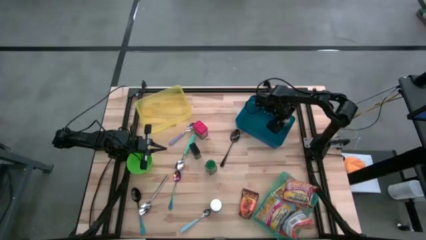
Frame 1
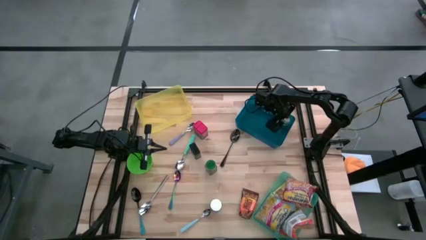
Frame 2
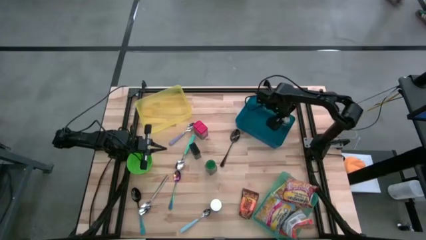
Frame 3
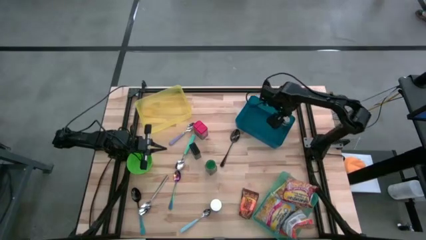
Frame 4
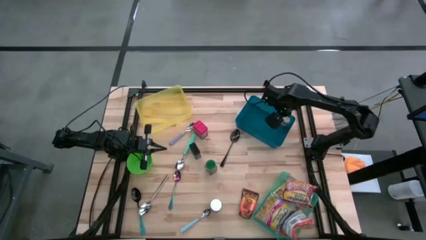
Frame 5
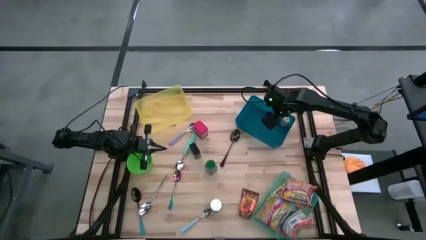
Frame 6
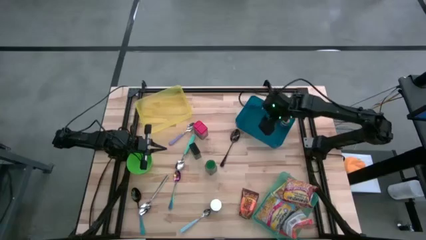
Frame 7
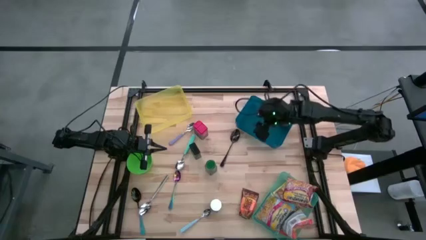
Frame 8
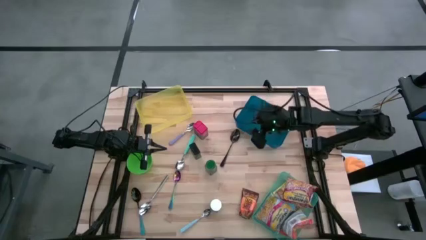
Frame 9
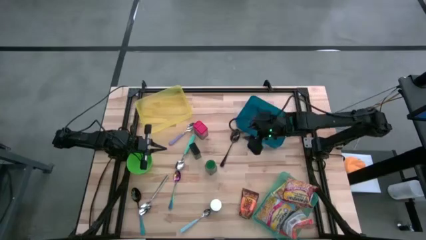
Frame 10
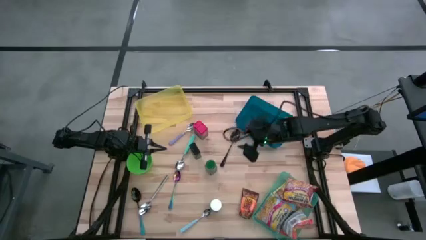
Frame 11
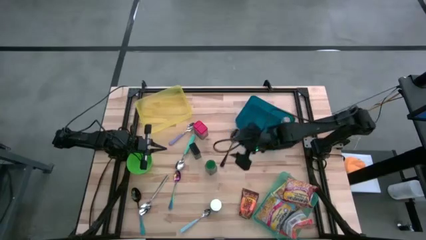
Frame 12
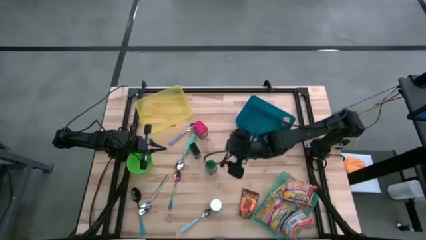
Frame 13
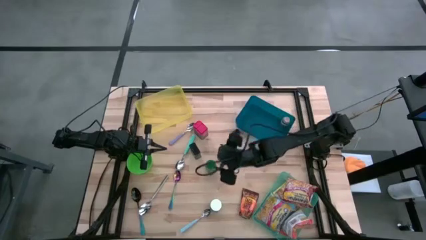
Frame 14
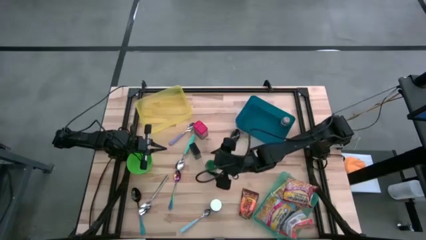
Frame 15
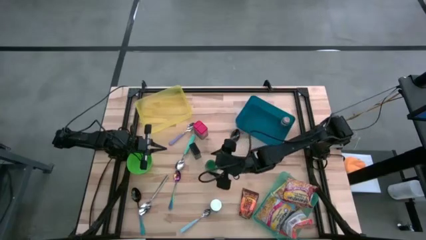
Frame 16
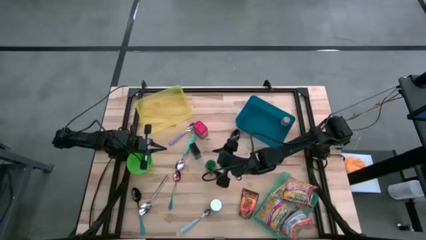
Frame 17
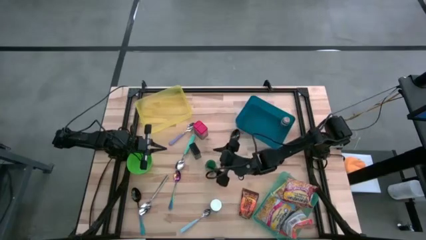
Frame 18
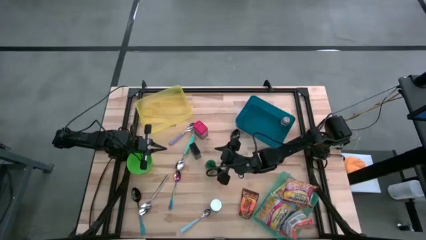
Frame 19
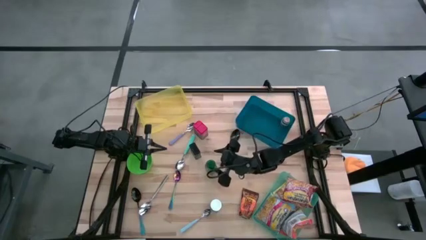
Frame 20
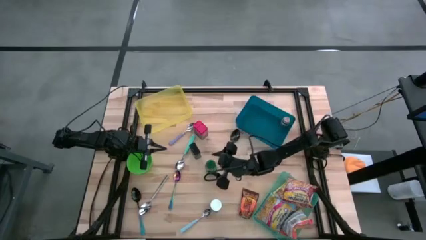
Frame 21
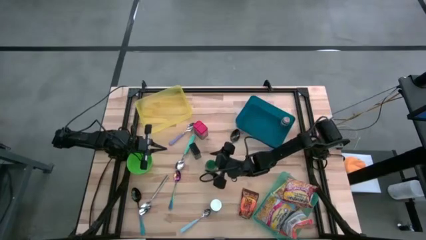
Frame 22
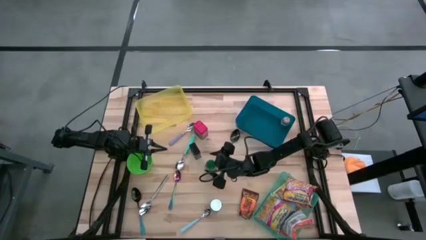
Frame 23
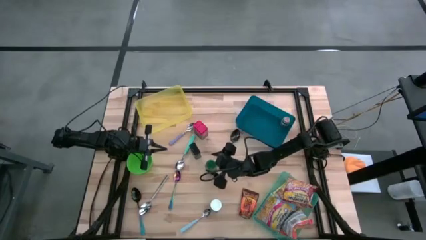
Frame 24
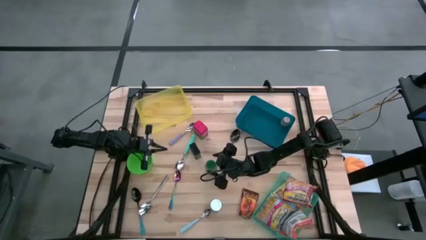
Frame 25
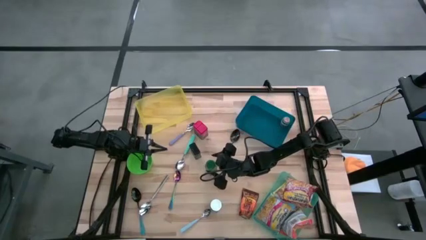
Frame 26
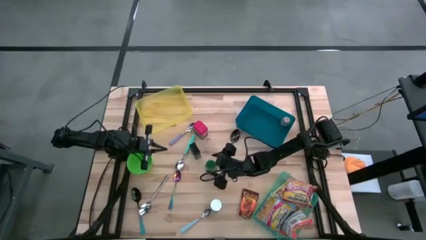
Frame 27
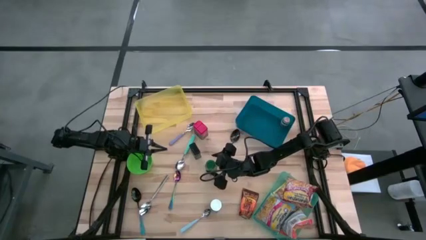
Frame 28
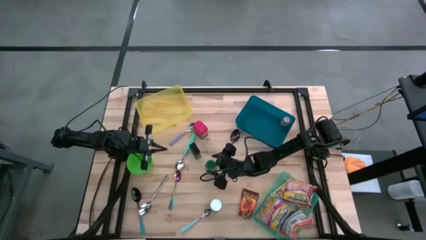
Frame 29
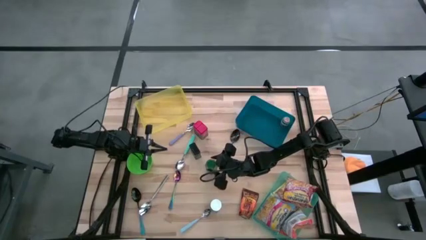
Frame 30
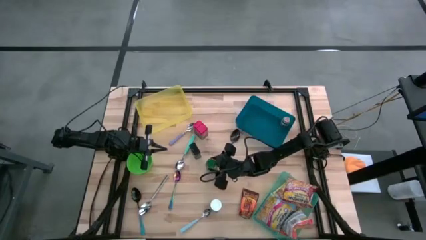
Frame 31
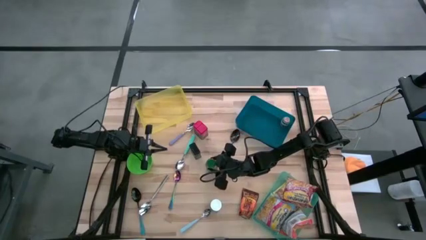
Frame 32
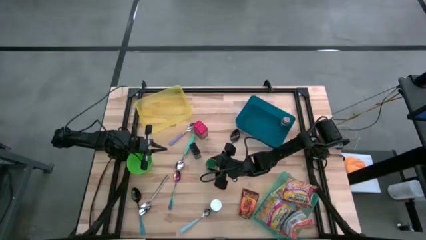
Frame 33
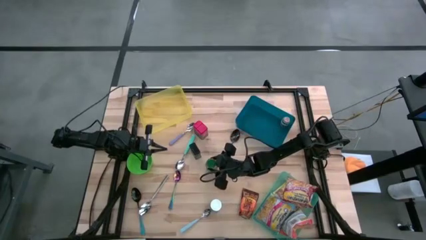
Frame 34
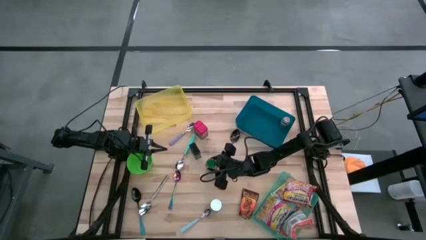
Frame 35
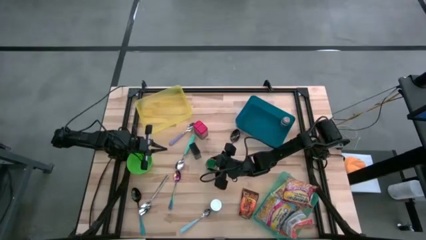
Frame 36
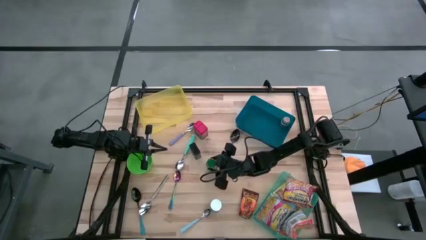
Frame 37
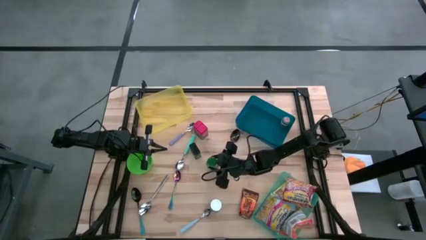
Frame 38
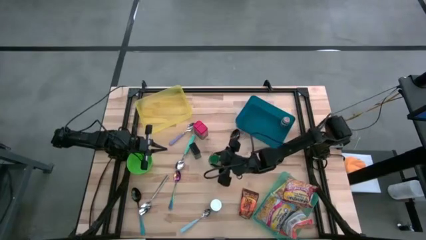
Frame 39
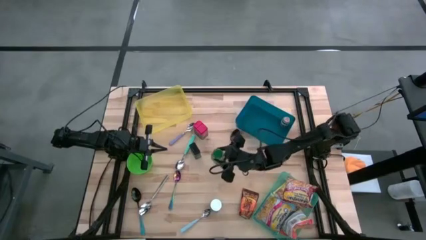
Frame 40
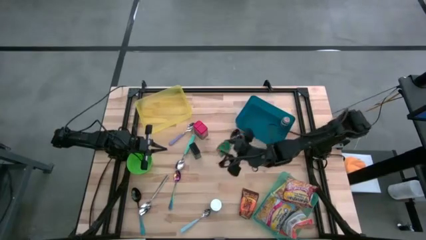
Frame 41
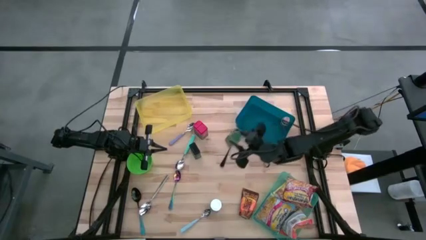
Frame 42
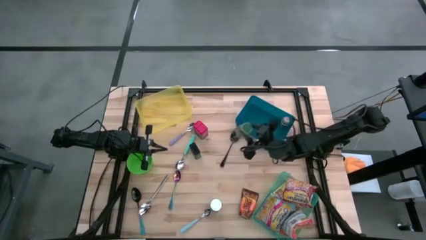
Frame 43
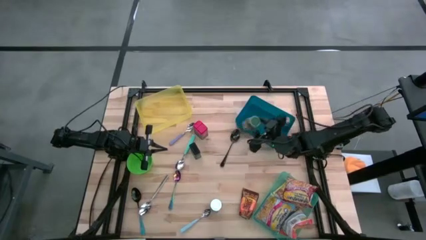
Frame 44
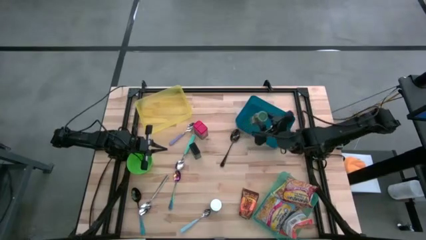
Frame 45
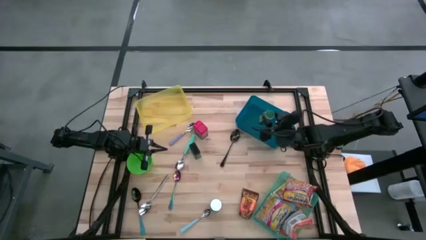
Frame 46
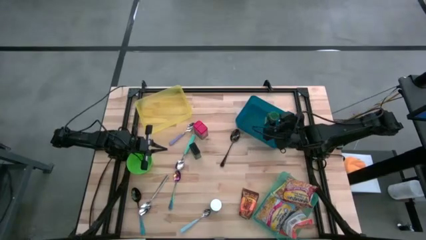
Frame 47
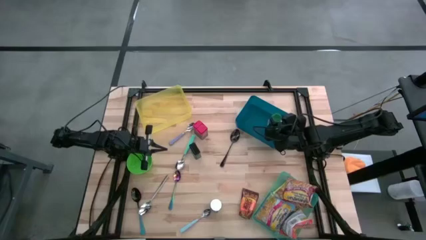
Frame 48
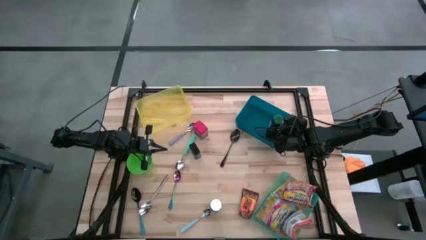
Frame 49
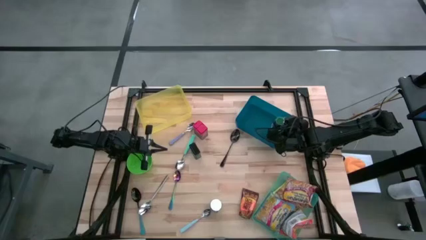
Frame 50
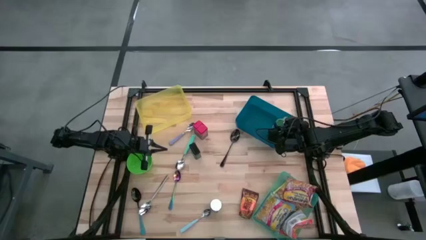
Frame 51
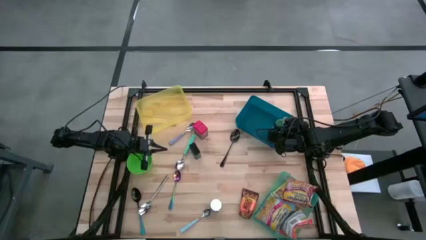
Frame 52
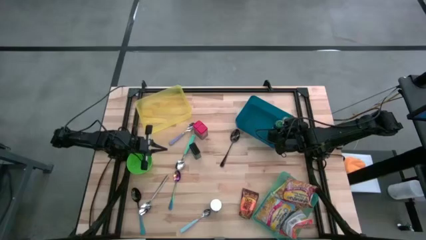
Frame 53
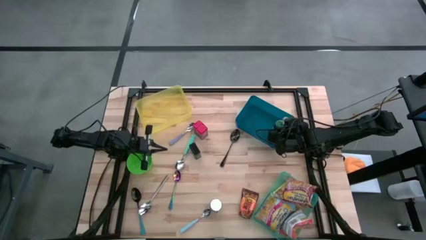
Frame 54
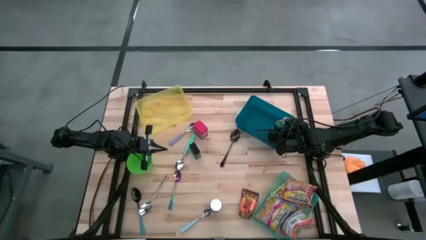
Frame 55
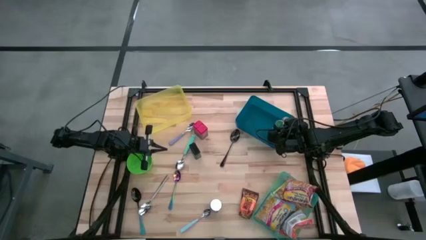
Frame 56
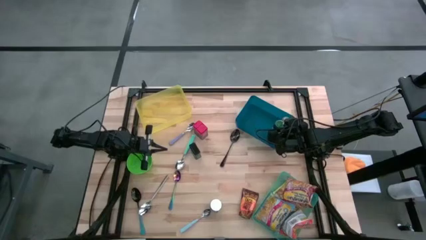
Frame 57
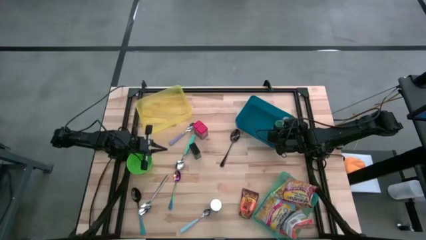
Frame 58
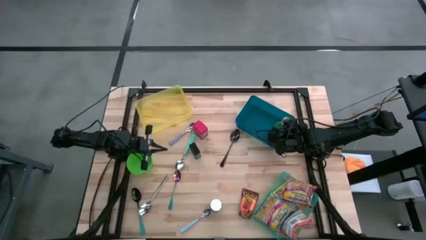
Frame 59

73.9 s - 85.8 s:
Put the green seasoning bottle into the blue bin
